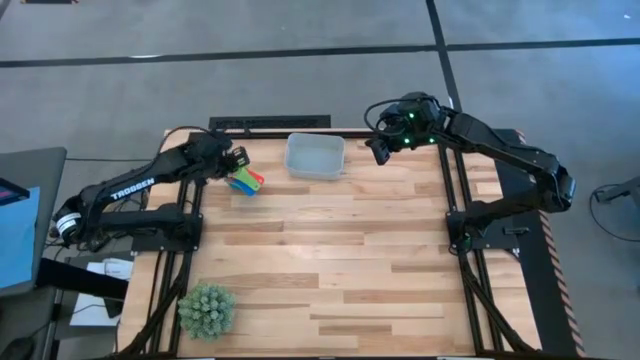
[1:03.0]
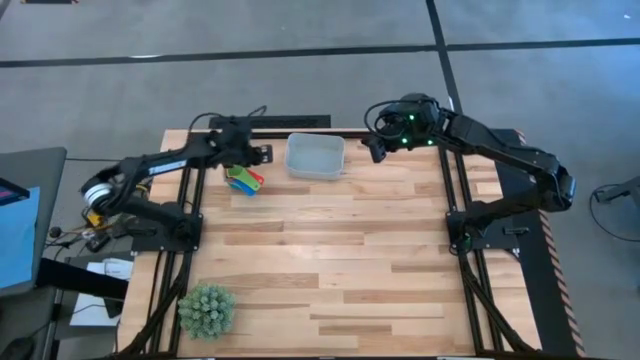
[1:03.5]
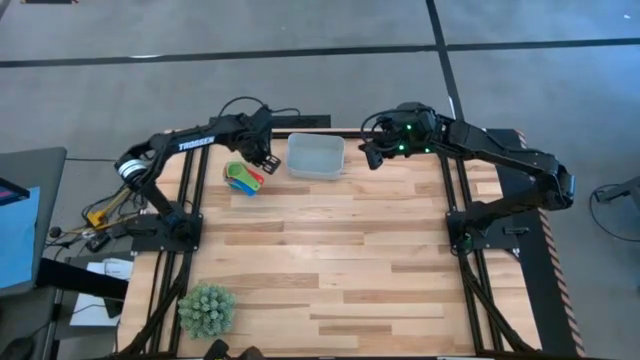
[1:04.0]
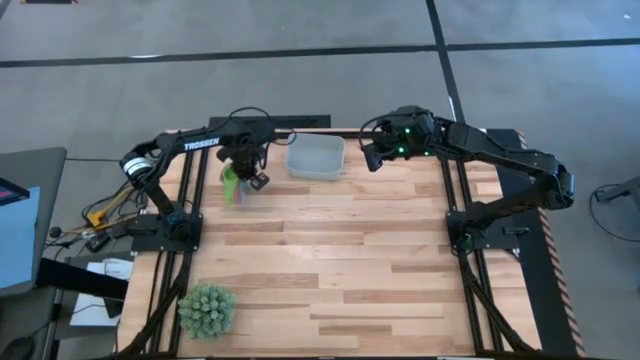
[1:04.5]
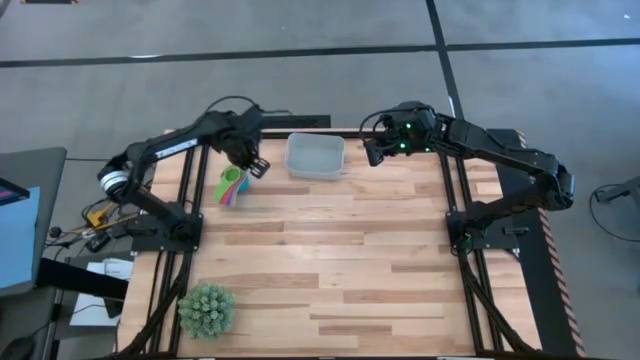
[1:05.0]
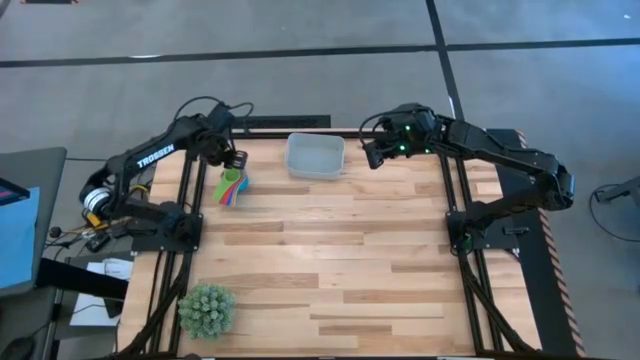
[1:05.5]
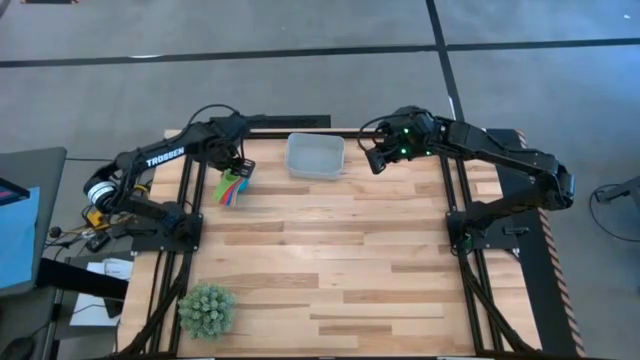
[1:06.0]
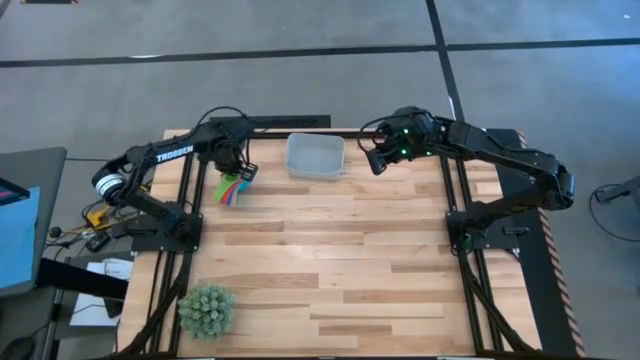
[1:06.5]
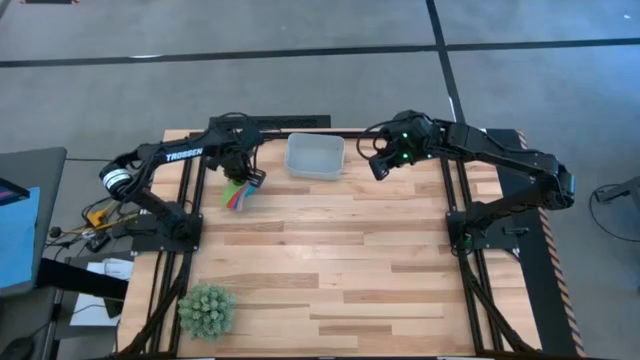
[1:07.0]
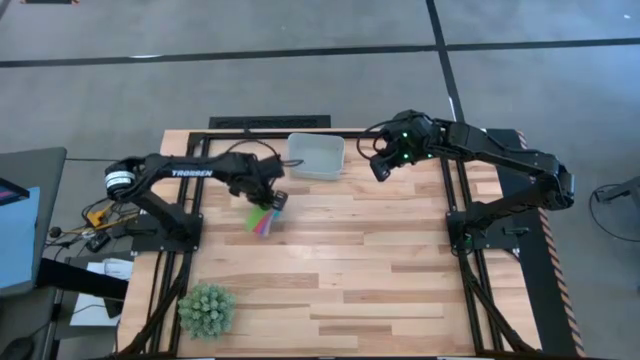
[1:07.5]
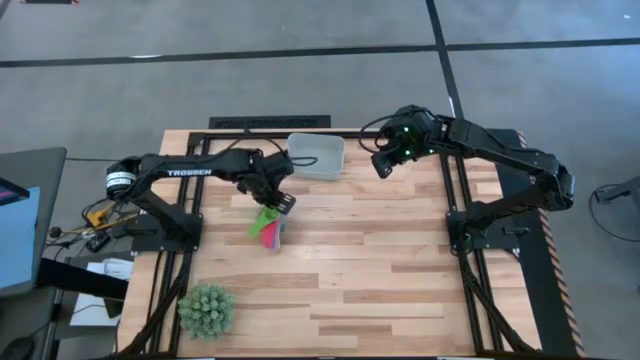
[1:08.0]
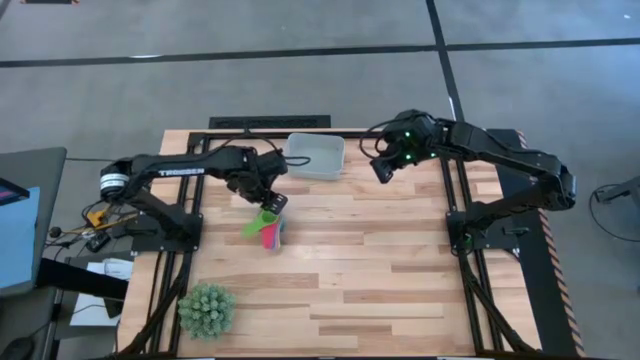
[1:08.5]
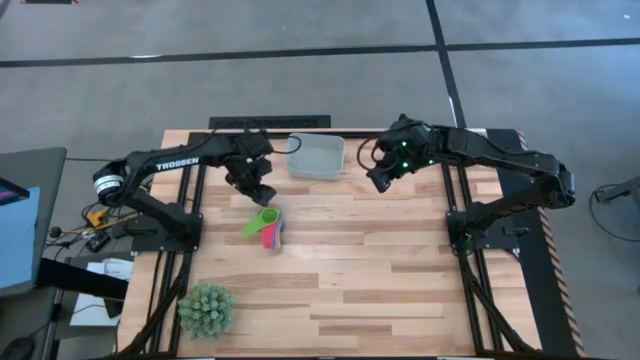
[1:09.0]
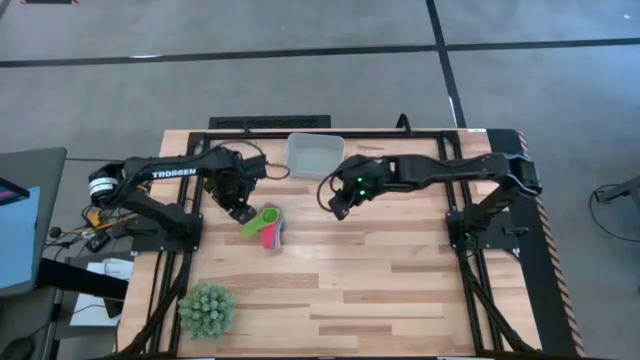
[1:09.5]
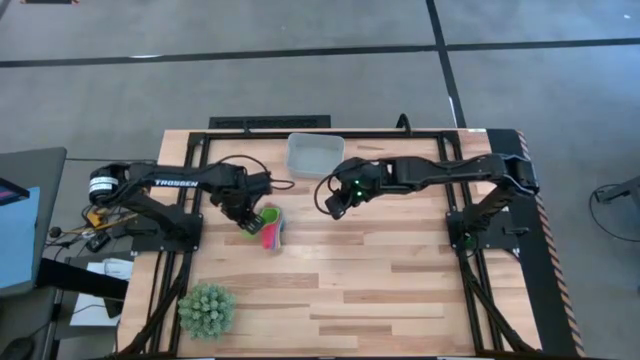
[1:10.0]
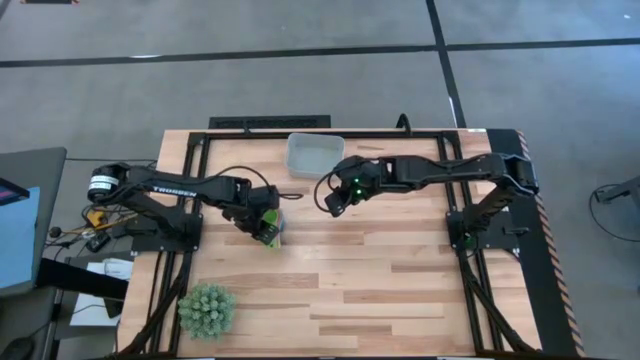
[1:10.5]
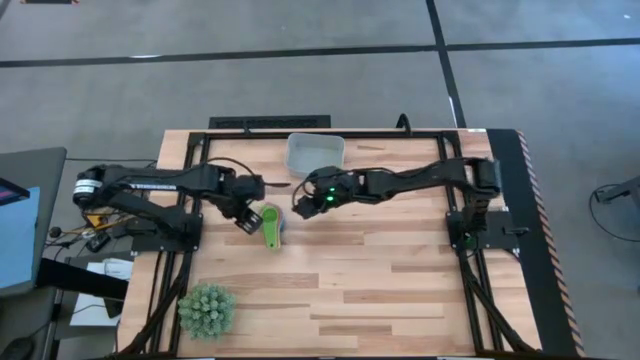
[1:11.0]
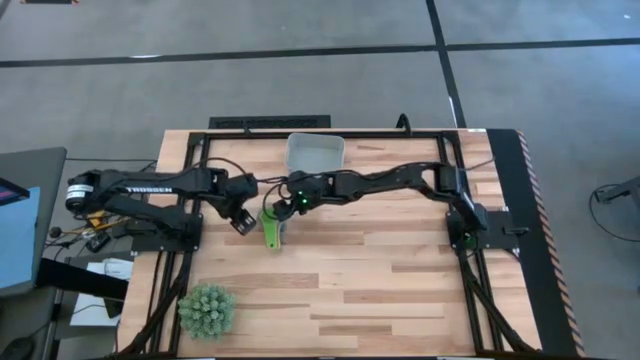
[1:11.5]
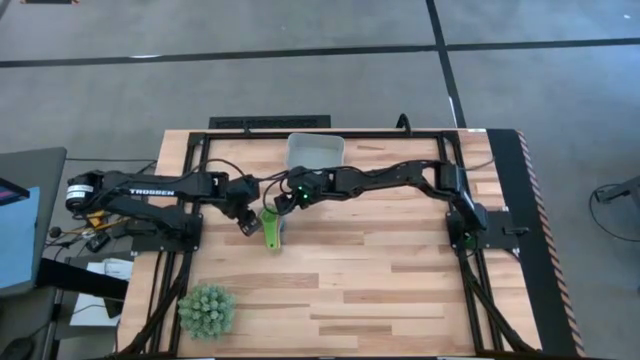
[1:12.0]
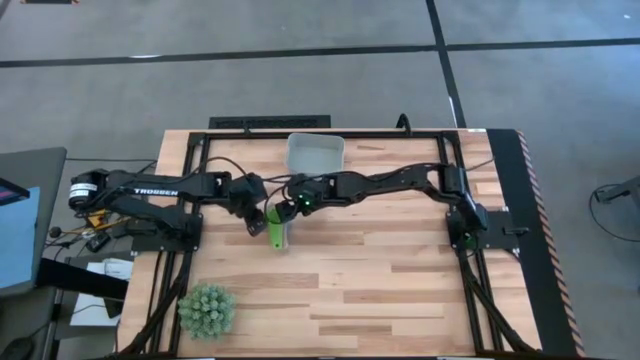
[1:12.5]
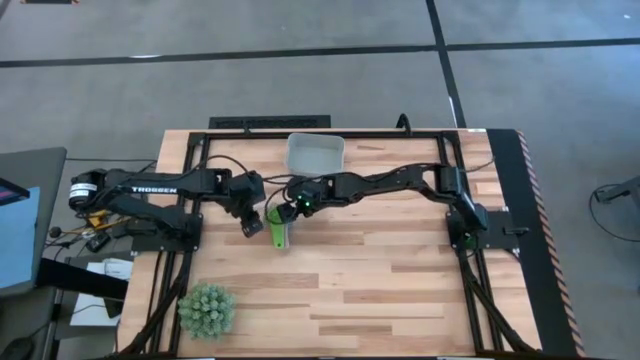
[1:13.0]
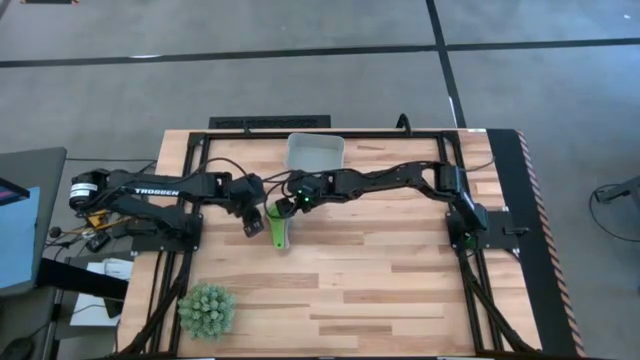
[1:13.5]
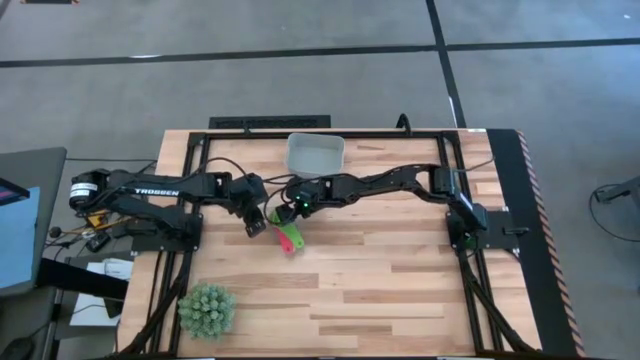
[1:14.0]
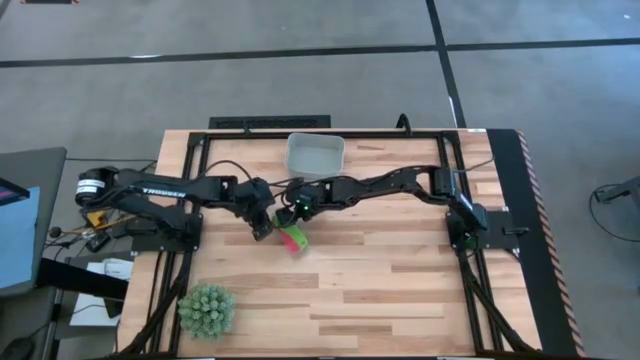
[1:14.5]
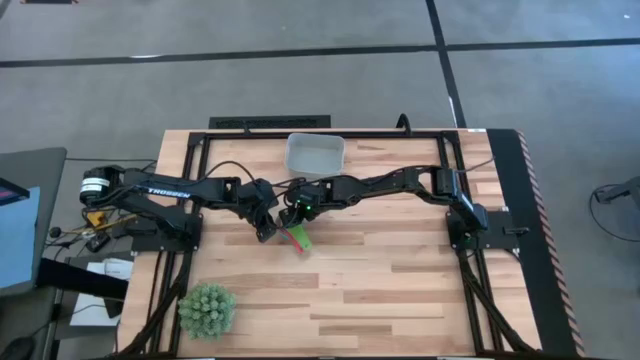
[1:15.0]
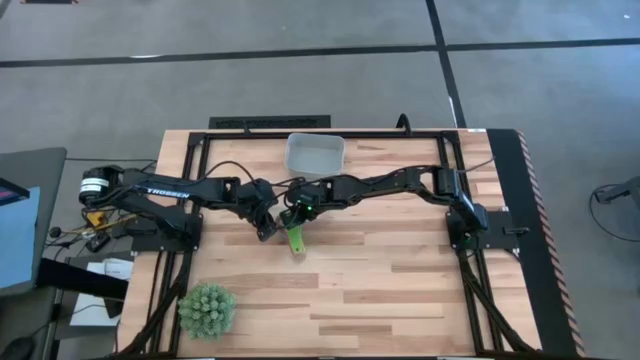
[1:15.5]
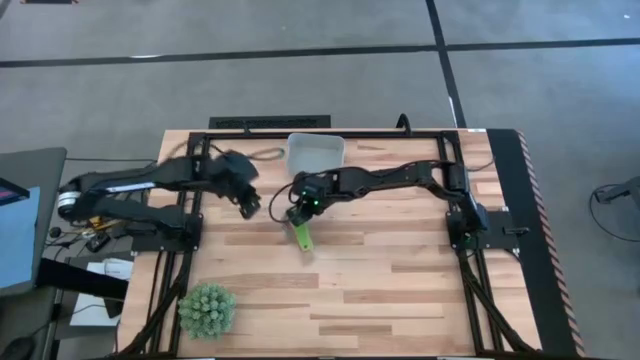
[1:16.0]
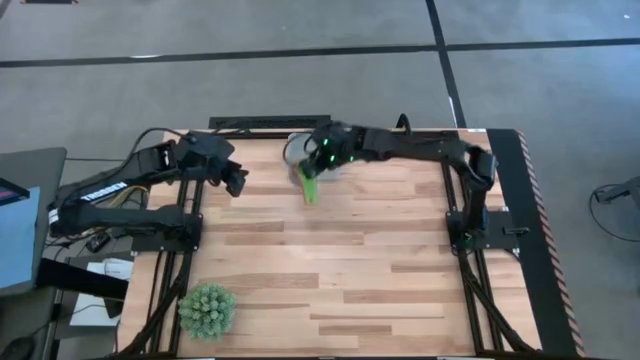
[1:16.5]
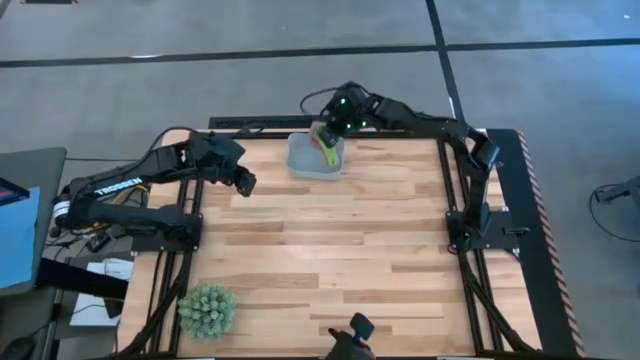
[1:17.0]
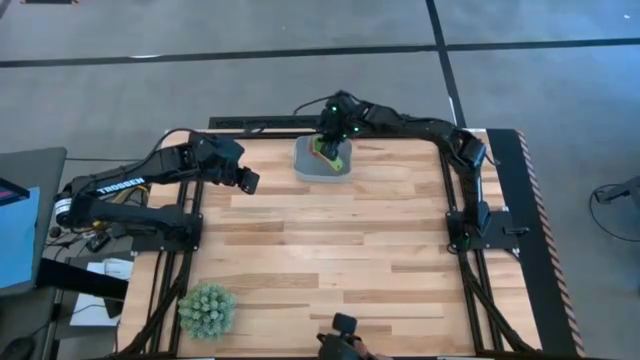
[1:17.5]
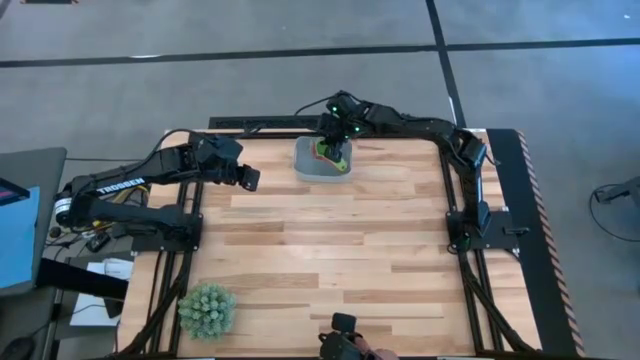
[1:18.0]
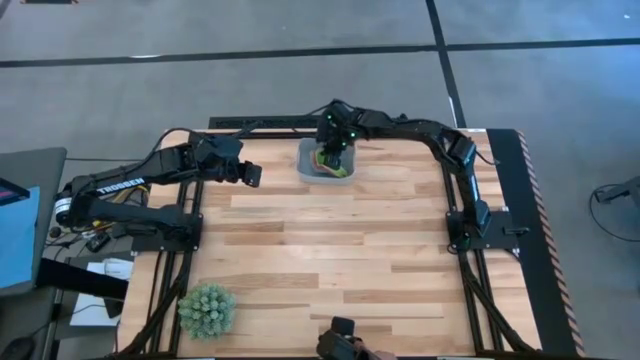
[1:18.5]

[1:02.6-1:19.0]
Task: Nest measuring cups in basket
Put the measuring cups into the white bin

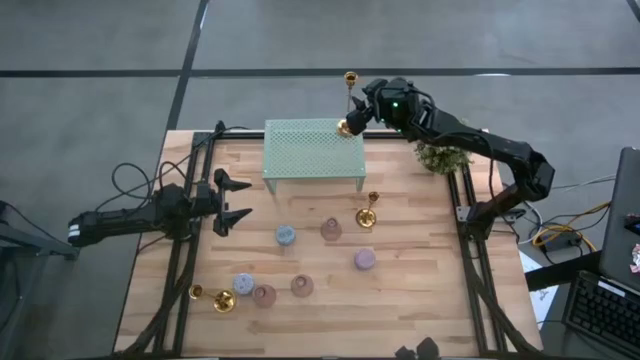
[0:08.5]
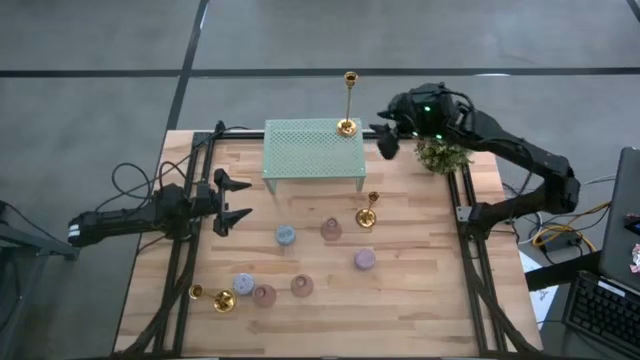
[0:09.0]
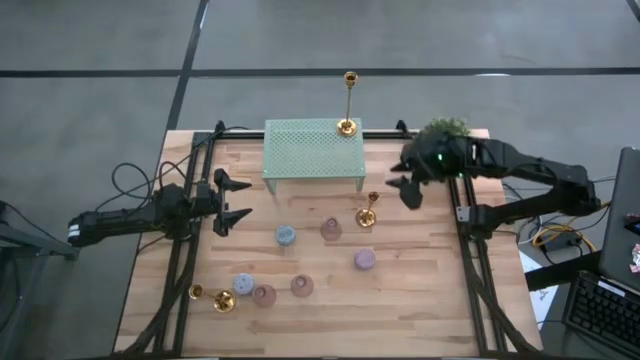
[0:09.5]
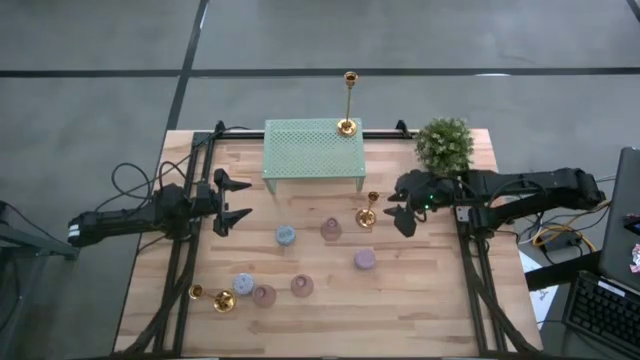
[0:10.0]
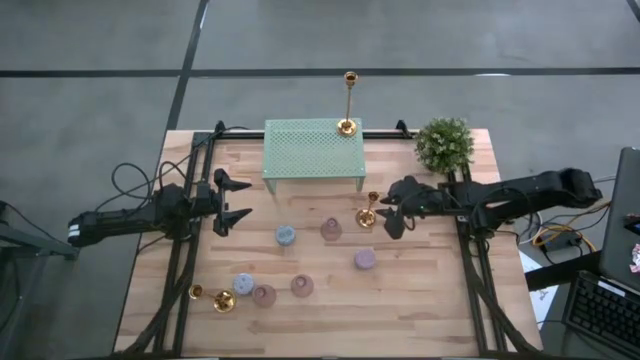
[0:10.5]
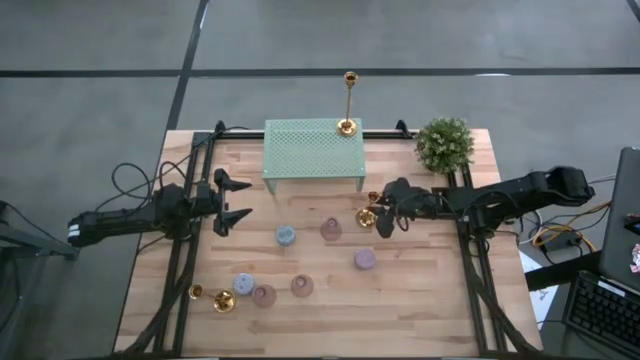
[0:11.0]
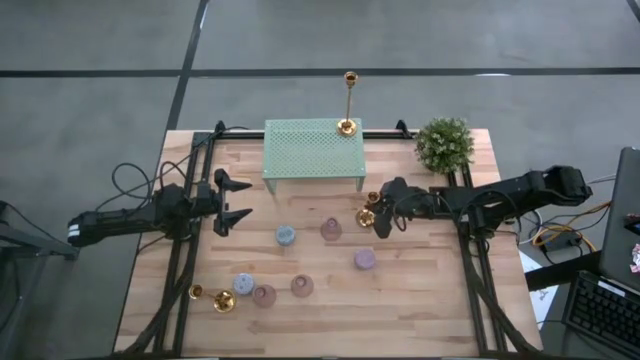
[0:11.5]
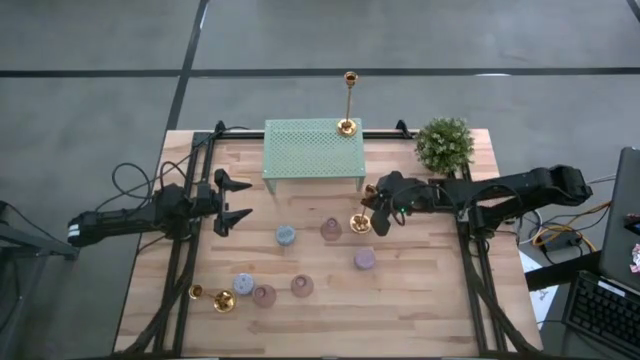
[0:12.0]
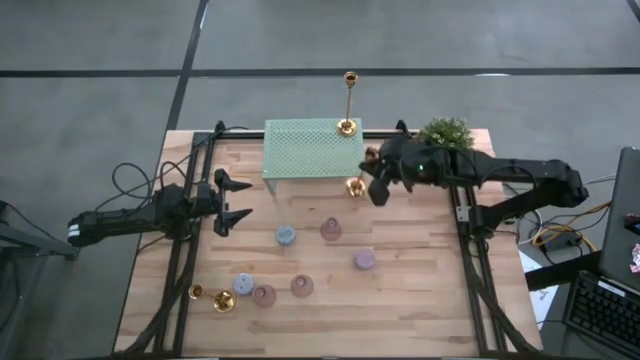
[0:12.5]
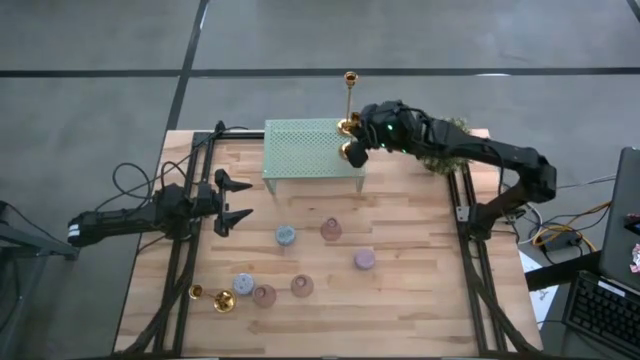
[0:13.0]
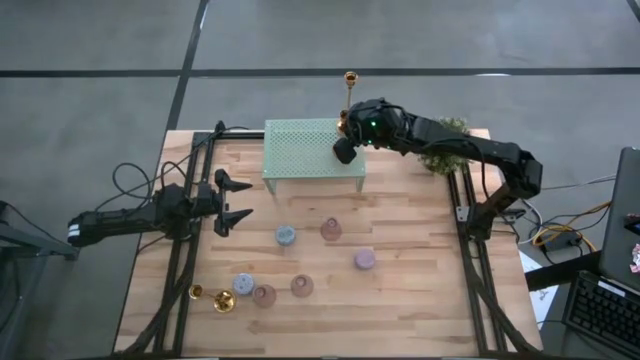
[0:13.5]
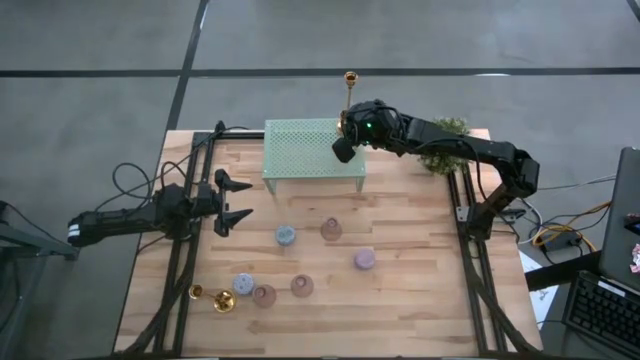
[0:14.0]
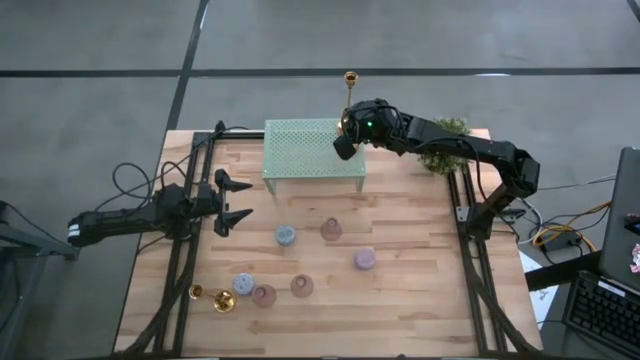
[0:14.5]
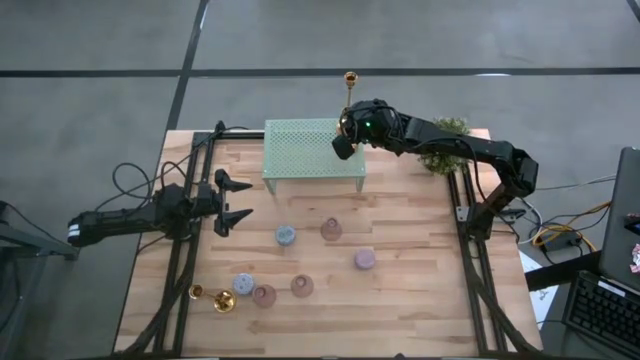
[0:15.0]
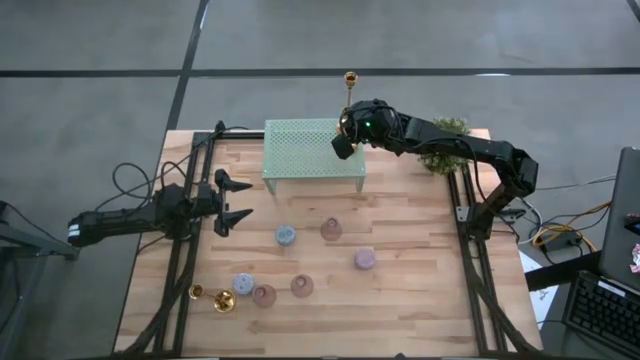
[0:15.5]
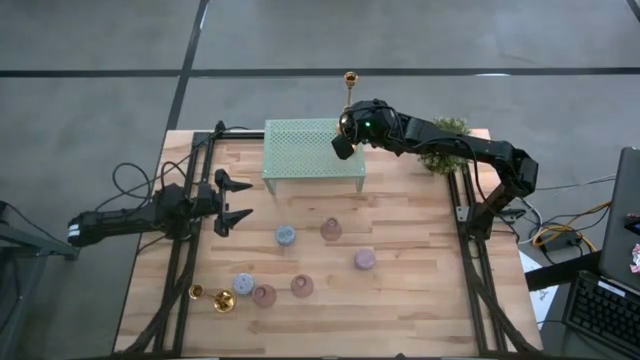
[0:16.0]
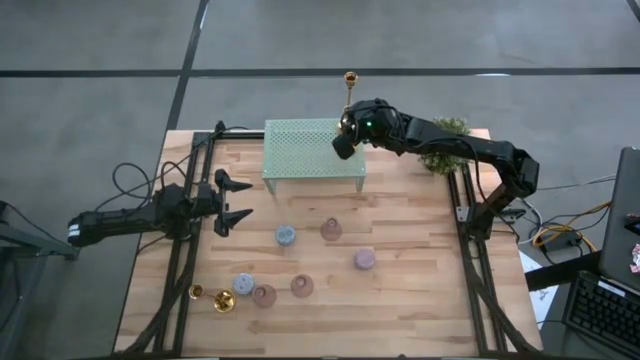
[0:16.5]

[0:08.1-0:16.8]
Task: Pick & Place candle stick holders
Put the top gold candle holder aligned with the other gold candle holder on the shelf
